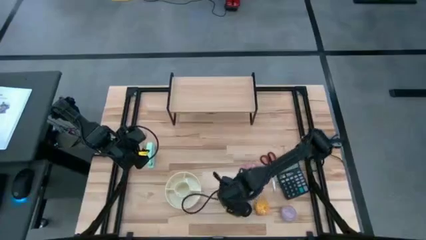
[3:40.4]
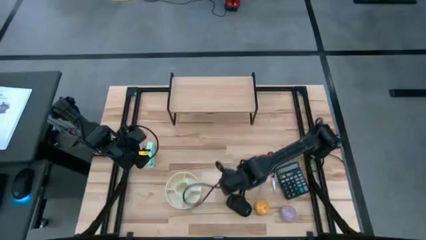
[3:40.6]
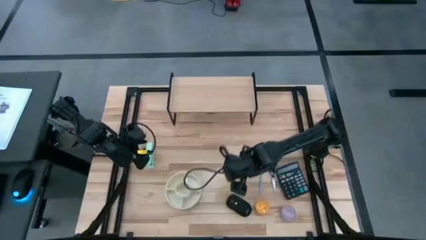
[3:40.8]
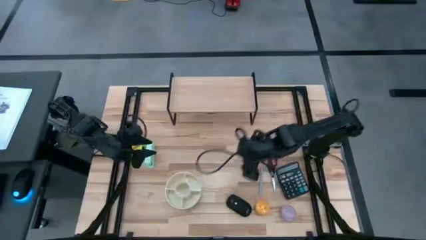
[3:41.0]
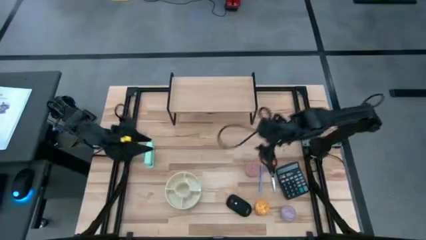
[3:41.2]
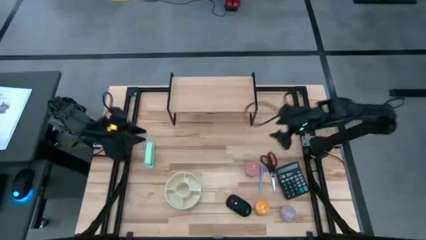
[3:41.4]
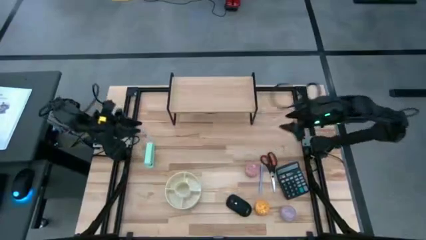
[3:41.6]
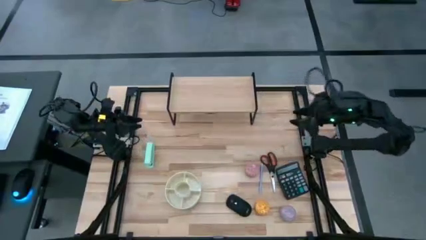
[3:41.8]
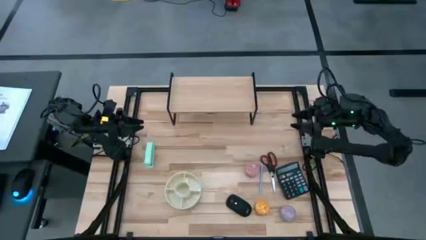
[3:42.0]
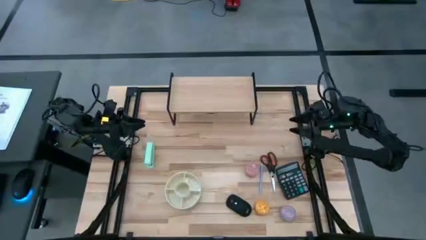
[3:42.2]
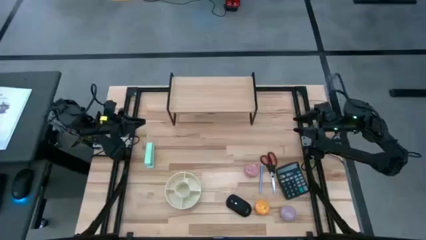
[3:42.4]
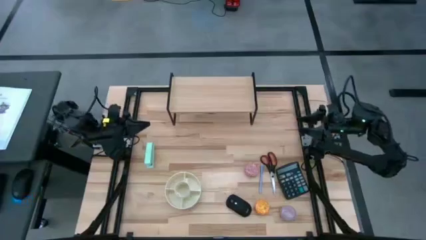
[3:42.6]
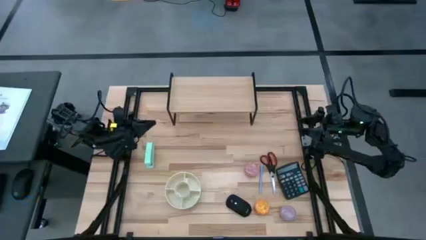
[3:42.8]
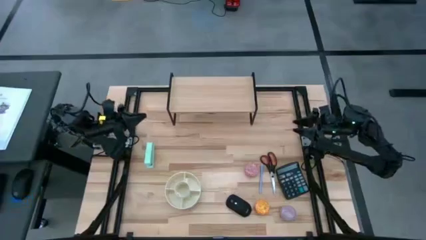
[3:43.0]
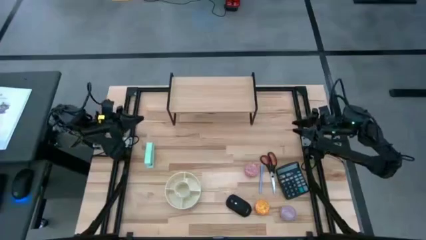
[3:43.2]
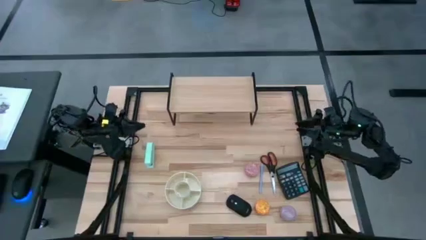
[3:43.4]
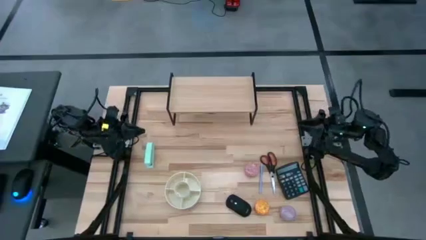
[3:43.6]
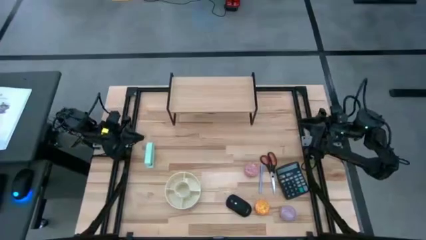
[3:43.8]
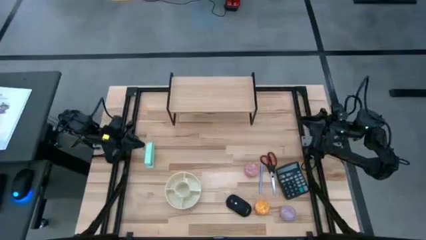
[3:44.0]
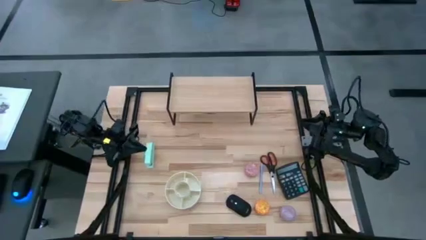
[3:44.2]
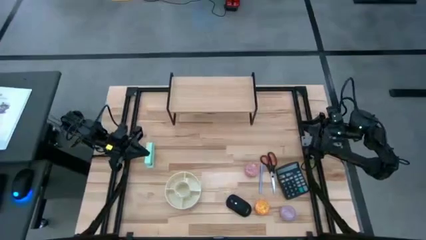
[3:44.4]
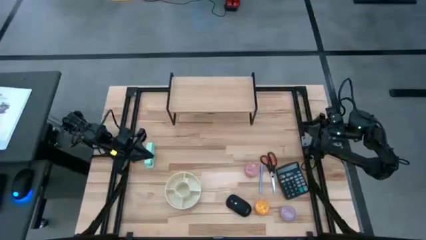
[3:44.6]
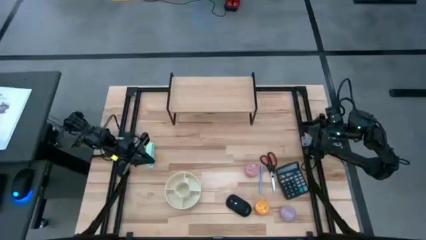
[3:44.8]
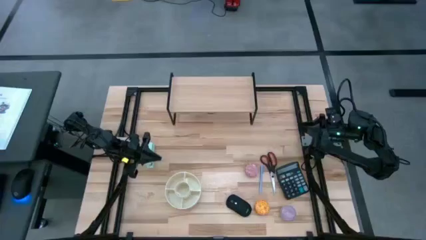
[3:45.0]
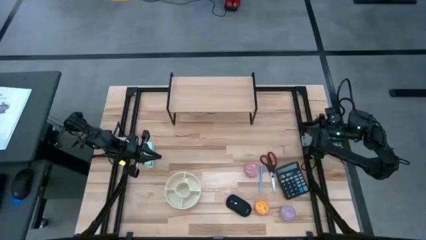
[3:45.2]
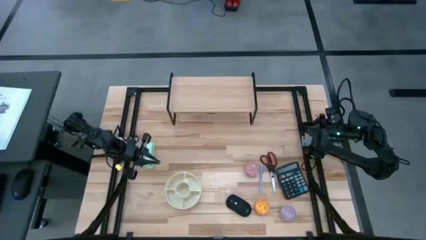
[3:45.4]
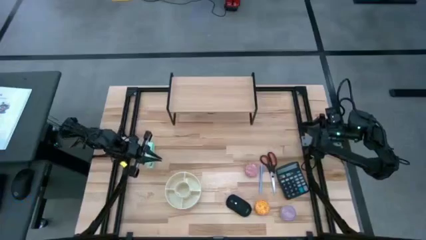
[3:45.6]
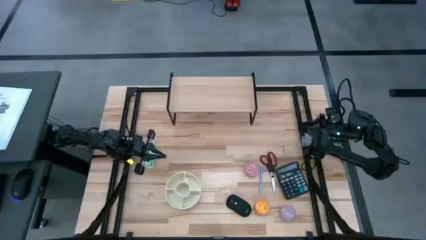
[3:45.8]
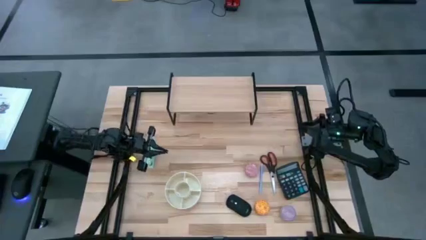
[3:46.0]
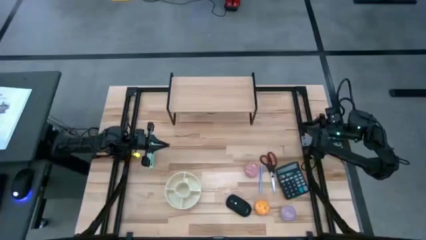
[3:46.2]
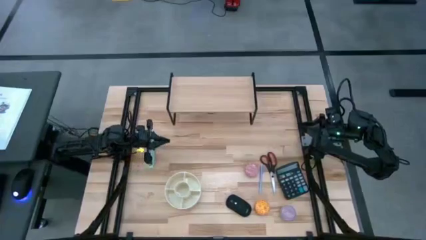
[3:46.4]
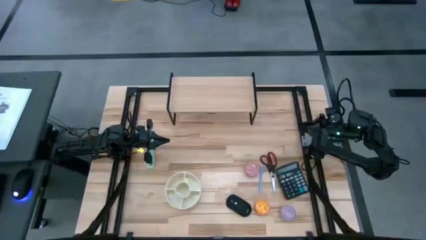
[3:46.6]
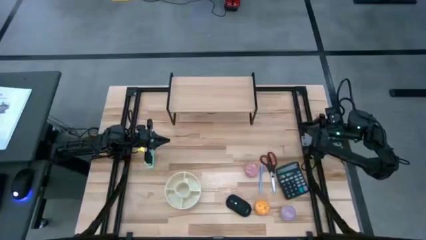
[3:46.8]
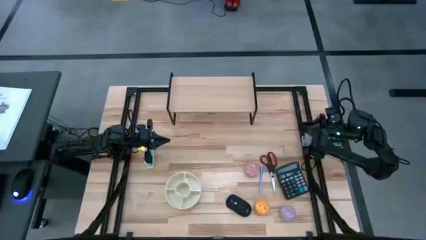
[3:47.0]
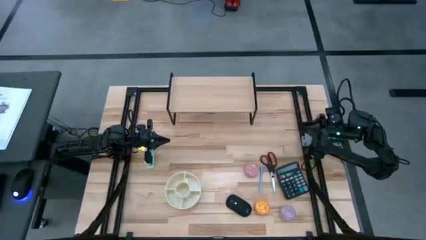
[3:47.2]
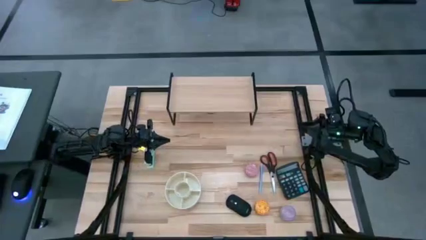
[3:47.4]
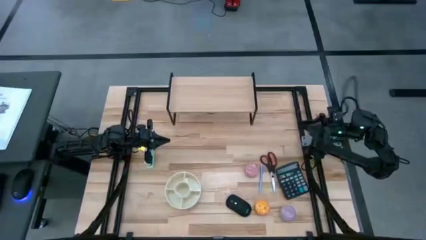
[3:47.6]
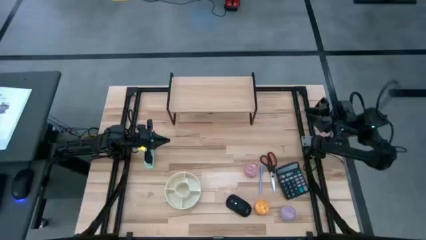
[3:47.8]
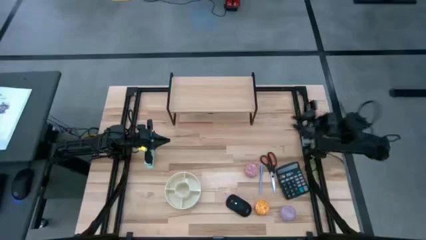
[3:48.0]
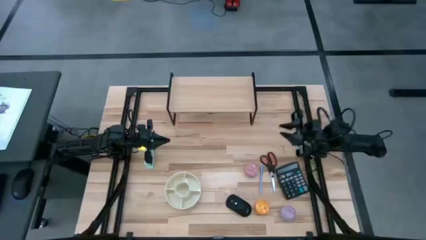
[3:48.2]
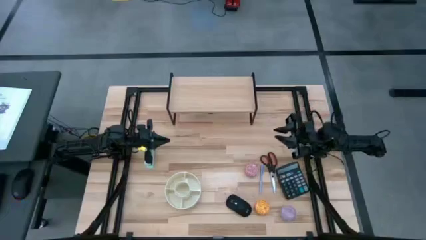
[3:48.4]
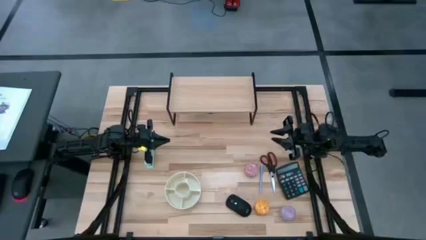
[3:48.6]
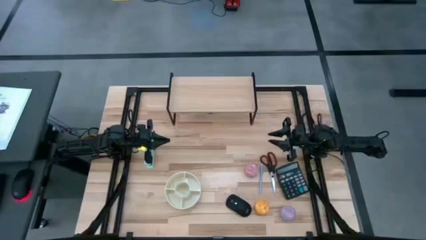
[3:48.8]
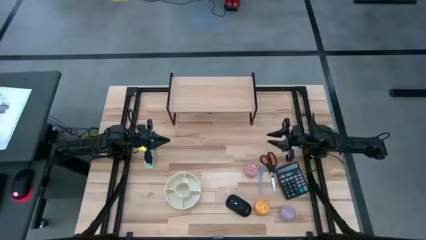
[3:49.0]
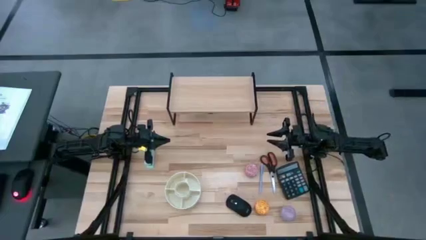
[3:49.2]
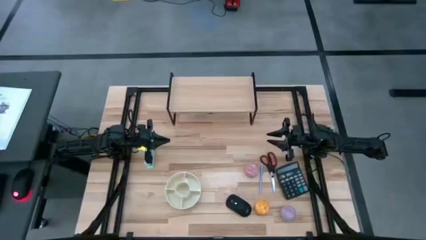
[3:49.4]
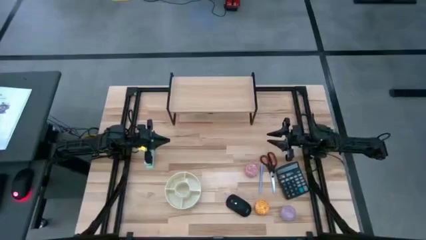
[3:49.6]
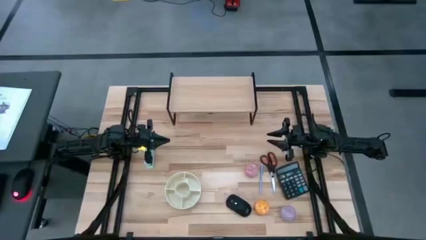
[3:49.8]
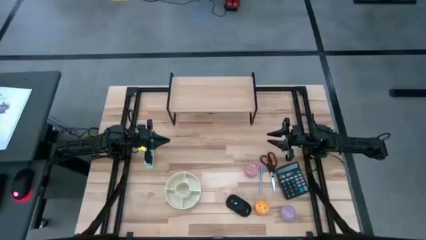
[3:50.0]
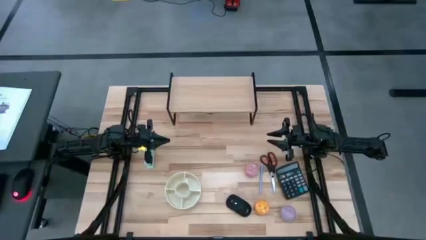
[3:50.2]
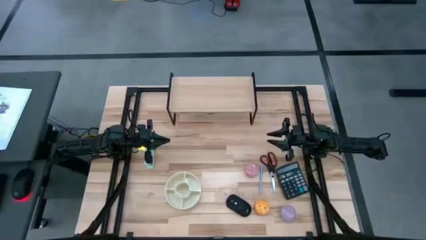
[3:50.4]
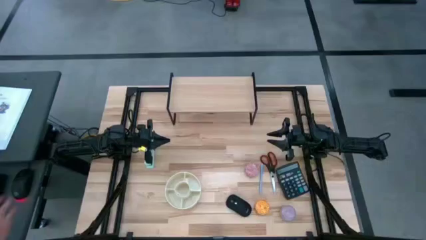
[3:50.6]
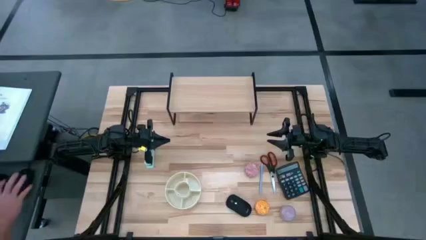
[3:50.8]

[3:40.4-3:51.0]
Task: Stock shelves
Return to Home Position
